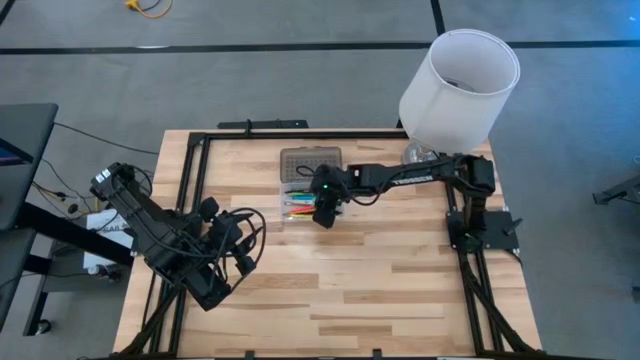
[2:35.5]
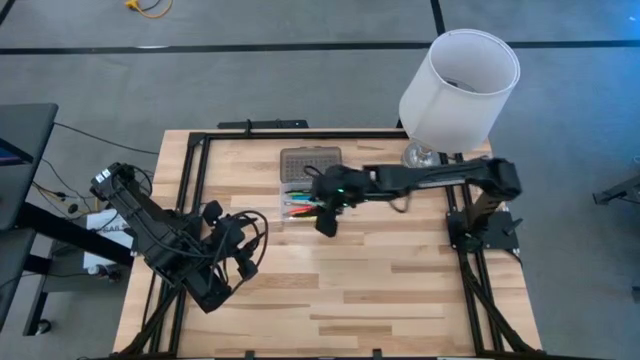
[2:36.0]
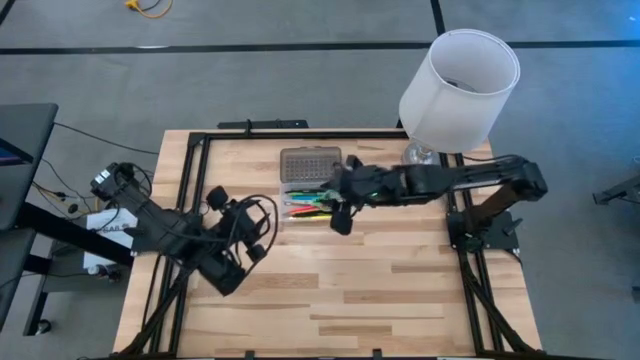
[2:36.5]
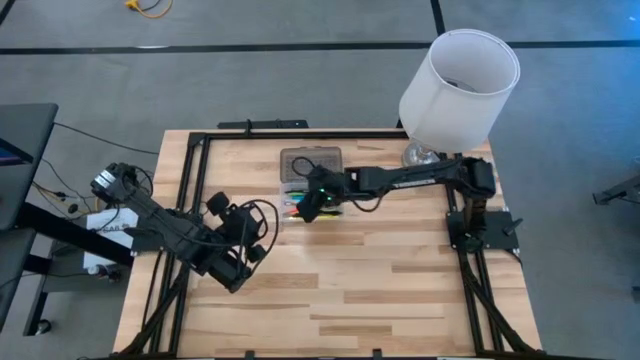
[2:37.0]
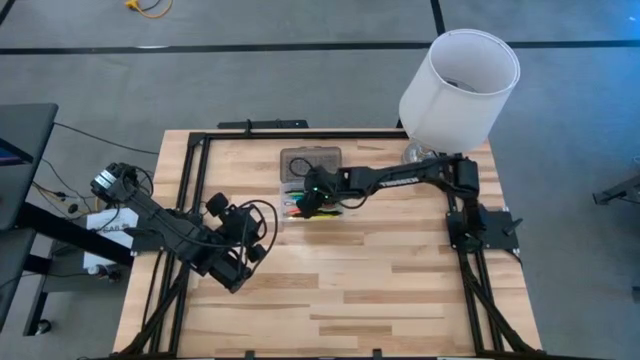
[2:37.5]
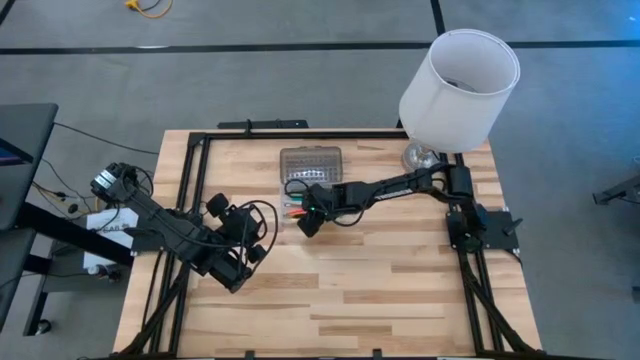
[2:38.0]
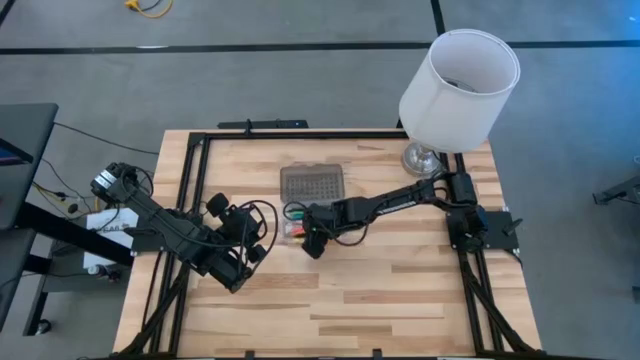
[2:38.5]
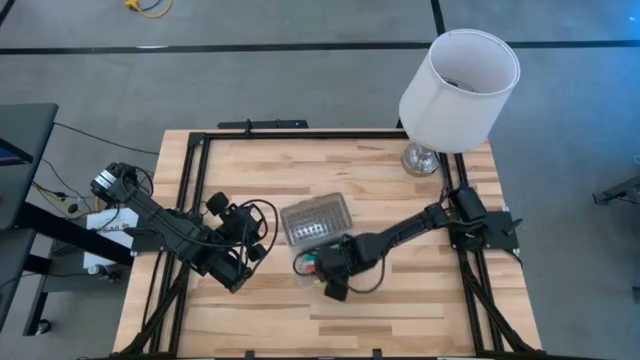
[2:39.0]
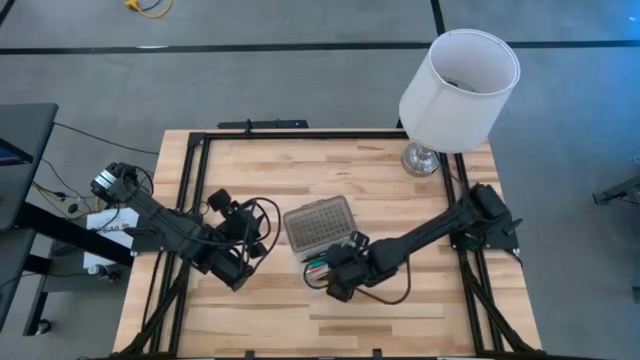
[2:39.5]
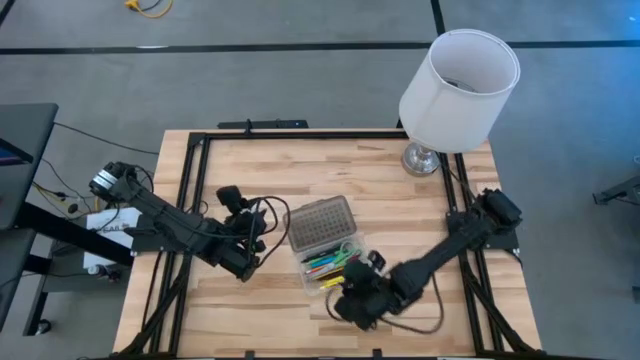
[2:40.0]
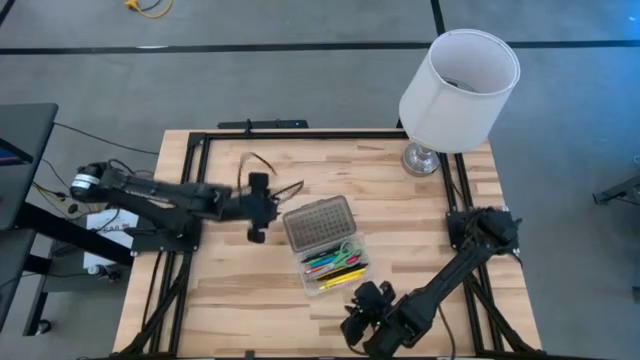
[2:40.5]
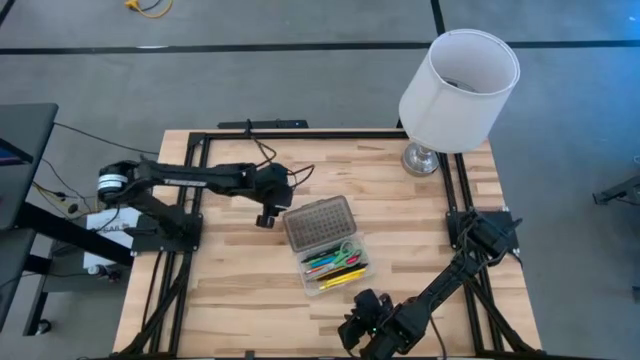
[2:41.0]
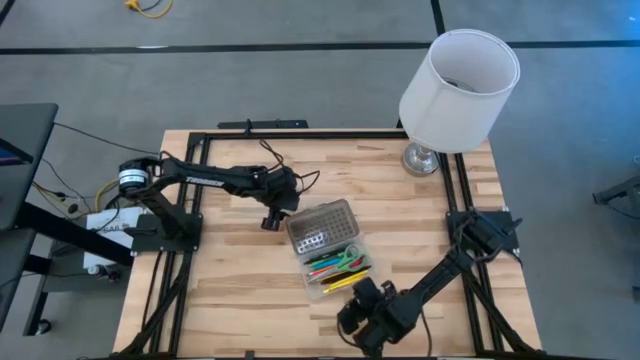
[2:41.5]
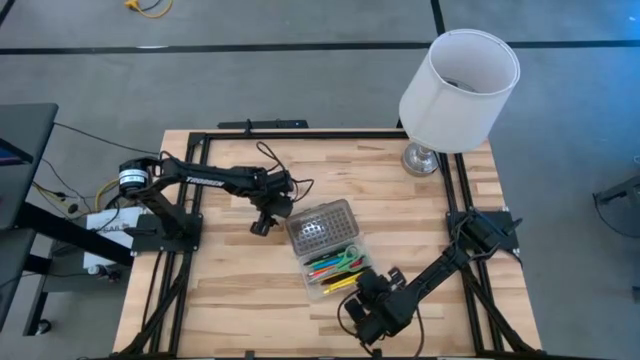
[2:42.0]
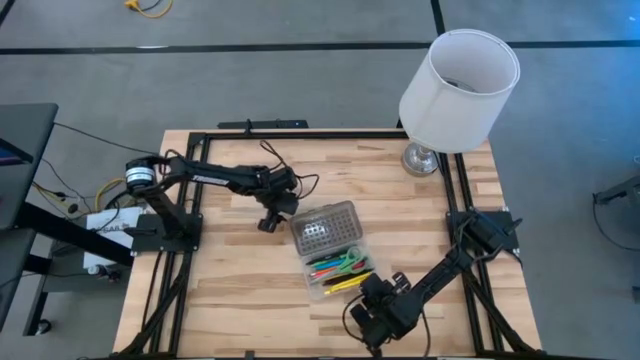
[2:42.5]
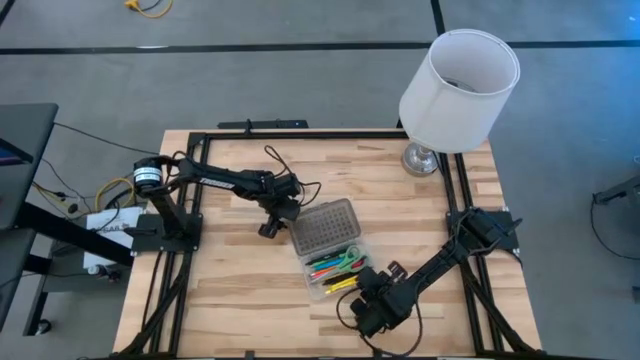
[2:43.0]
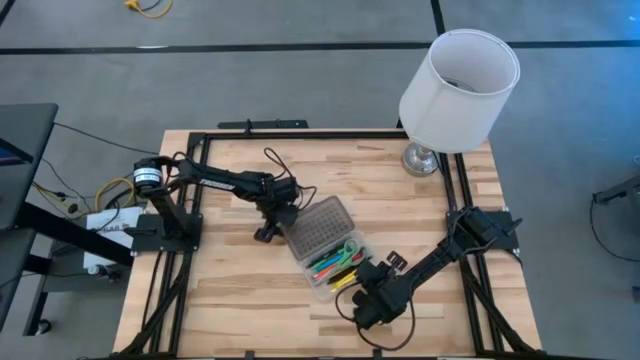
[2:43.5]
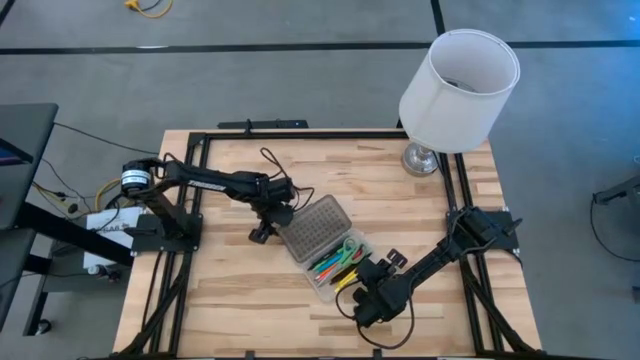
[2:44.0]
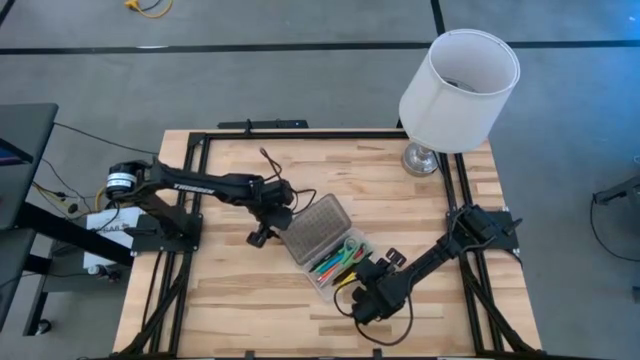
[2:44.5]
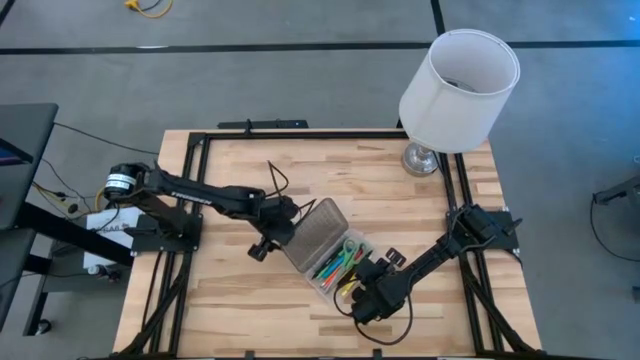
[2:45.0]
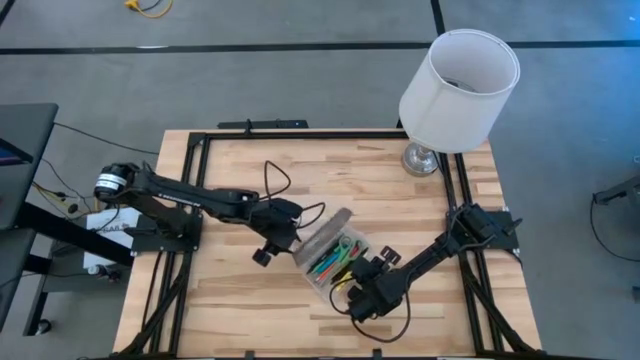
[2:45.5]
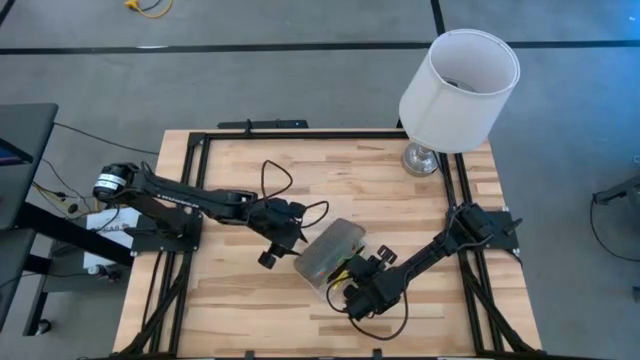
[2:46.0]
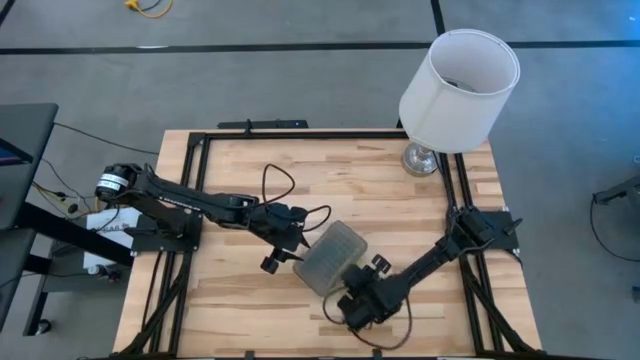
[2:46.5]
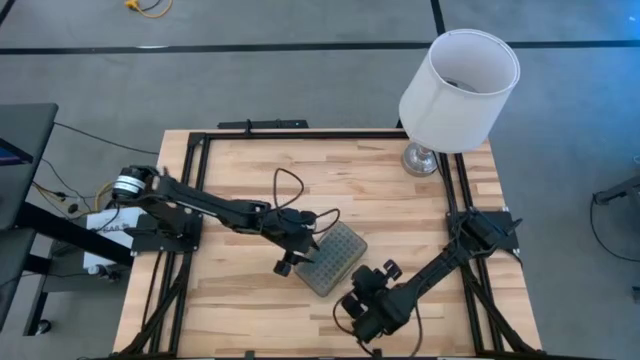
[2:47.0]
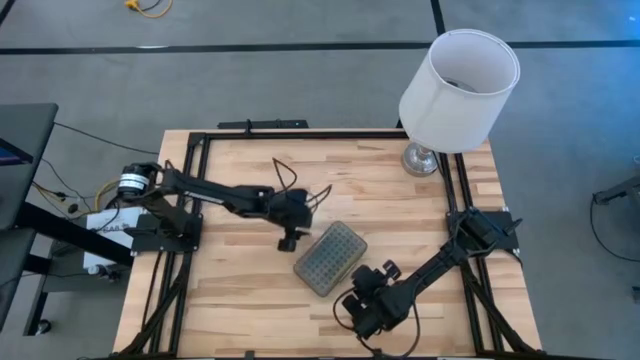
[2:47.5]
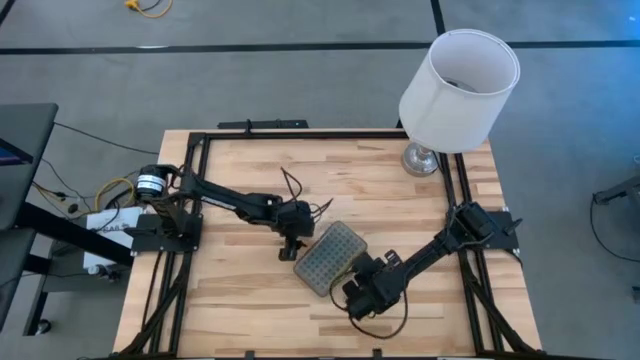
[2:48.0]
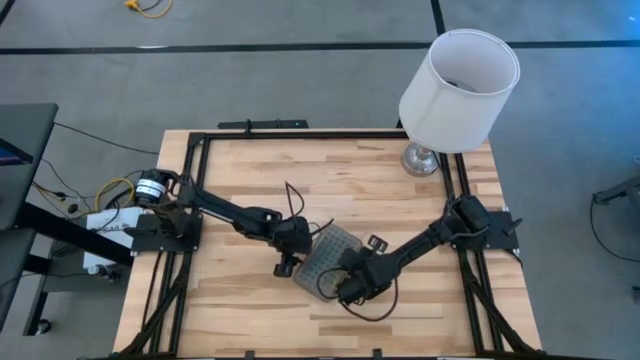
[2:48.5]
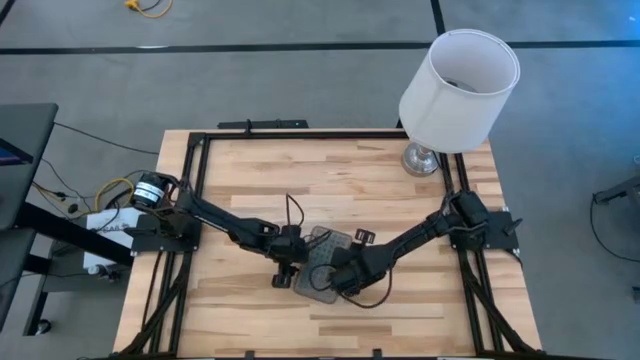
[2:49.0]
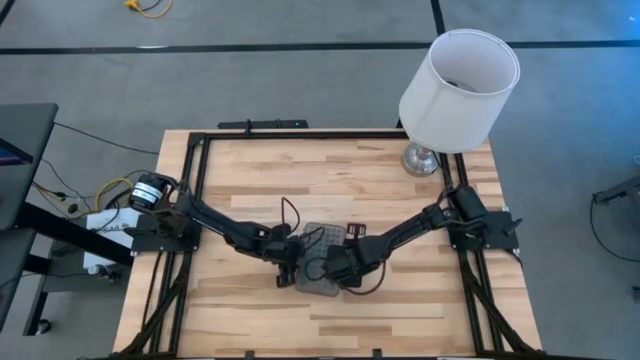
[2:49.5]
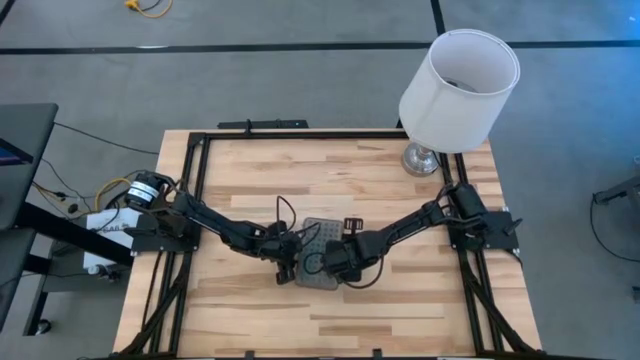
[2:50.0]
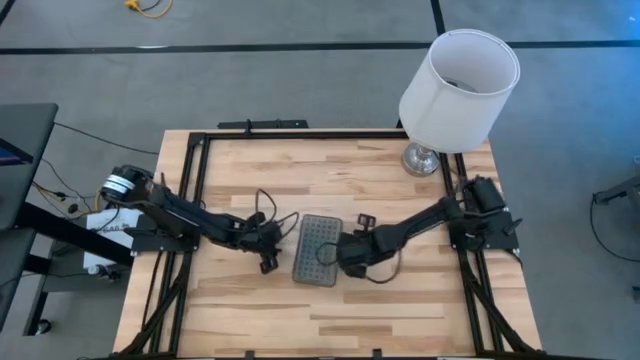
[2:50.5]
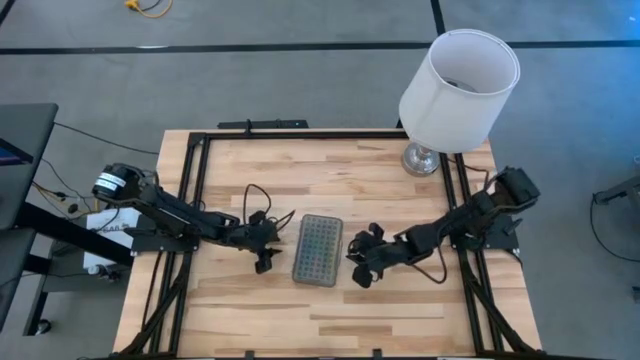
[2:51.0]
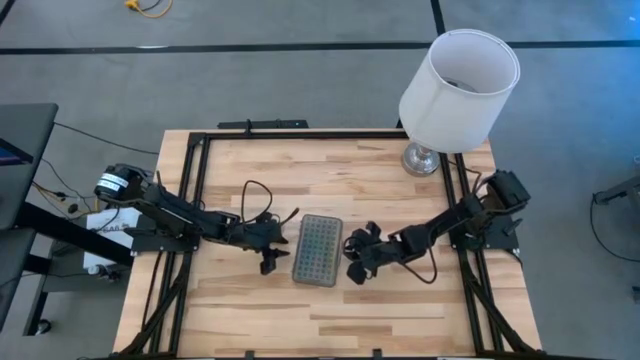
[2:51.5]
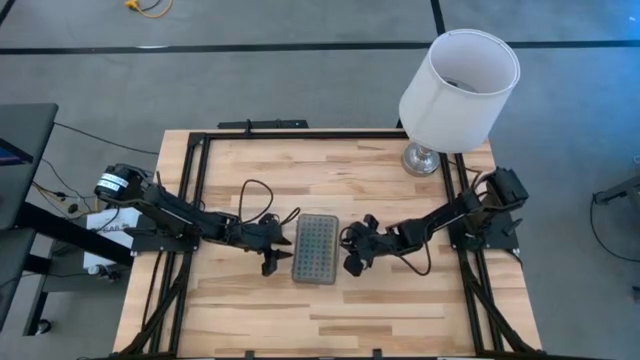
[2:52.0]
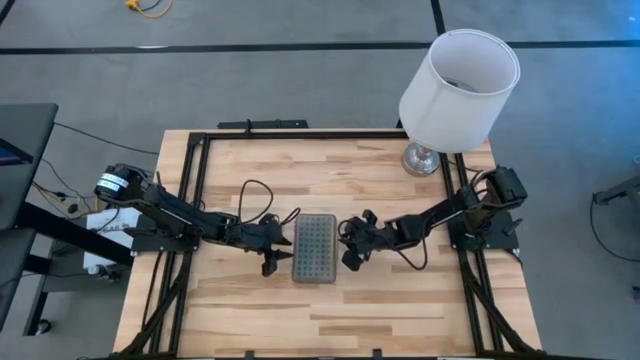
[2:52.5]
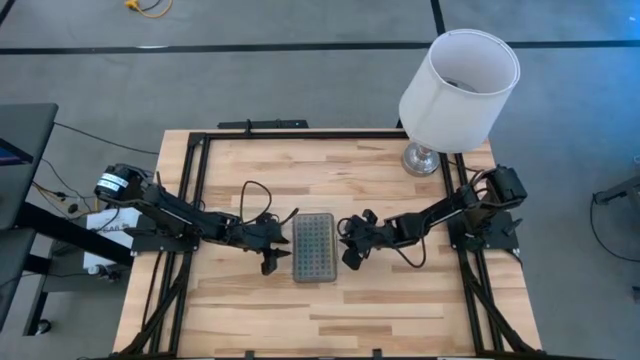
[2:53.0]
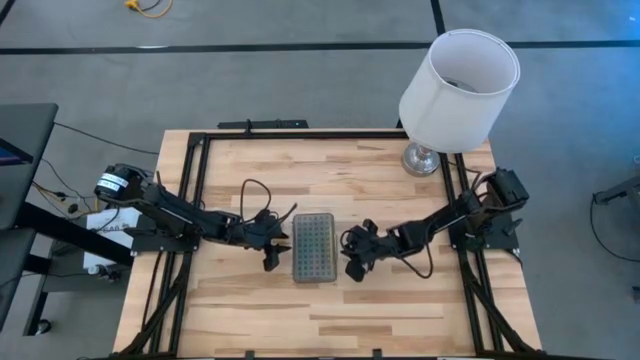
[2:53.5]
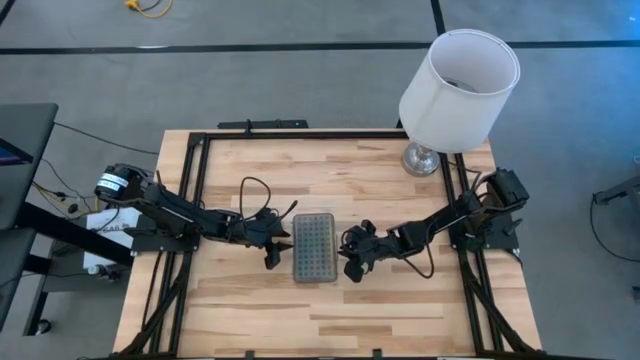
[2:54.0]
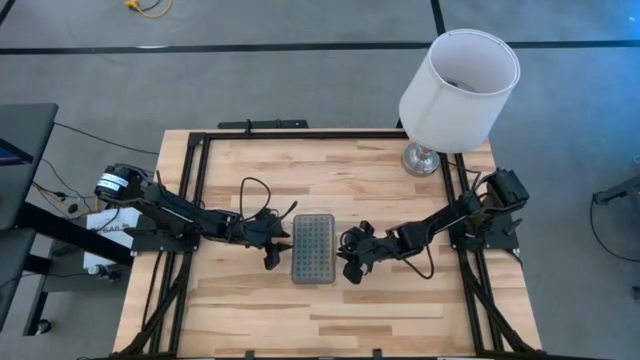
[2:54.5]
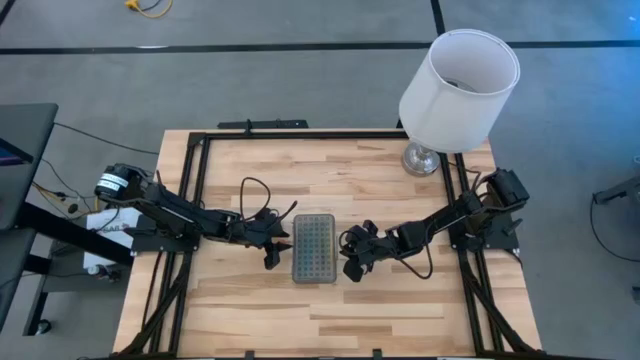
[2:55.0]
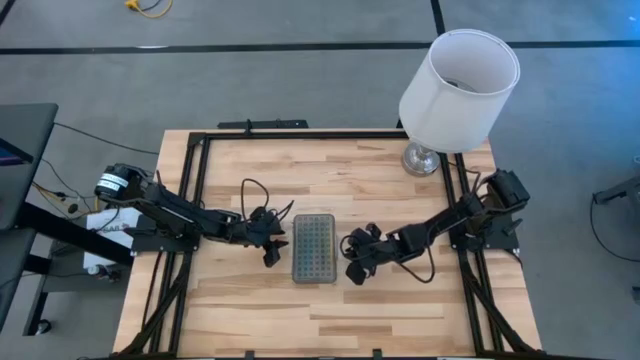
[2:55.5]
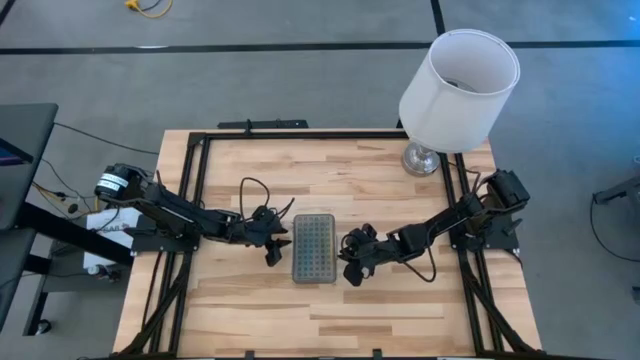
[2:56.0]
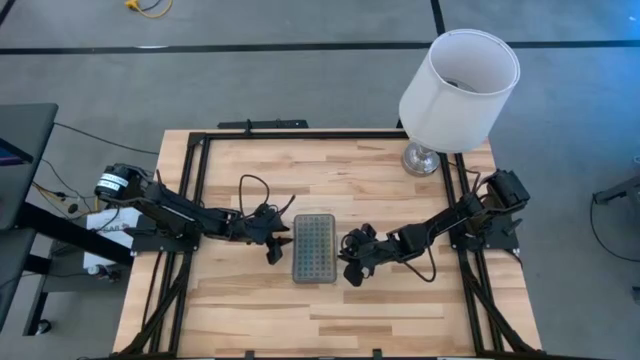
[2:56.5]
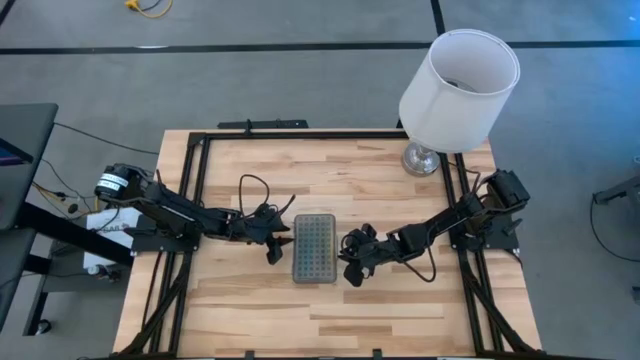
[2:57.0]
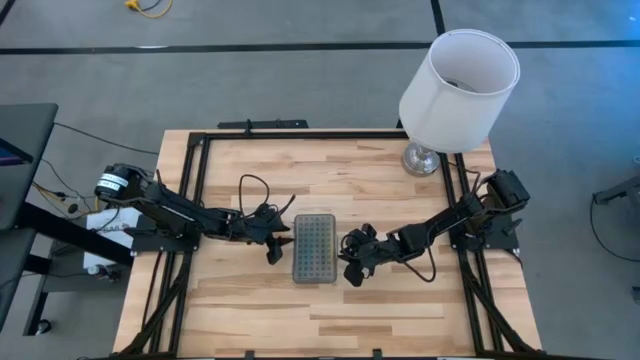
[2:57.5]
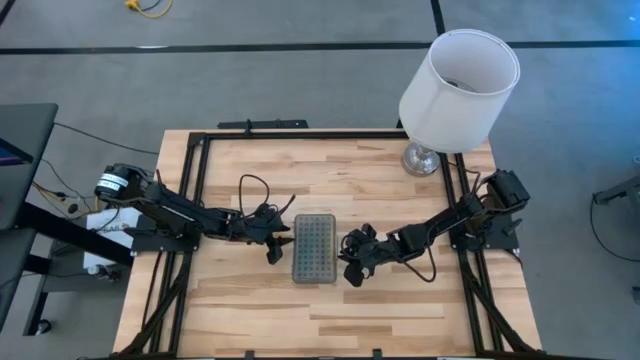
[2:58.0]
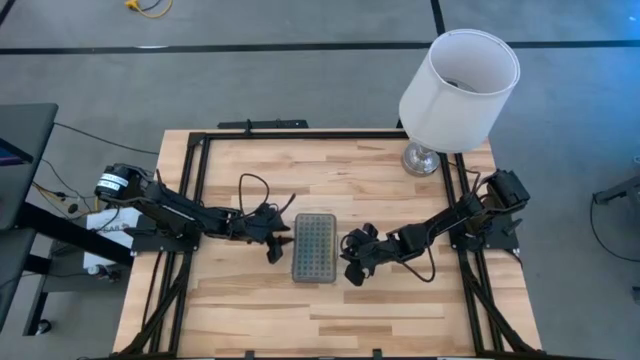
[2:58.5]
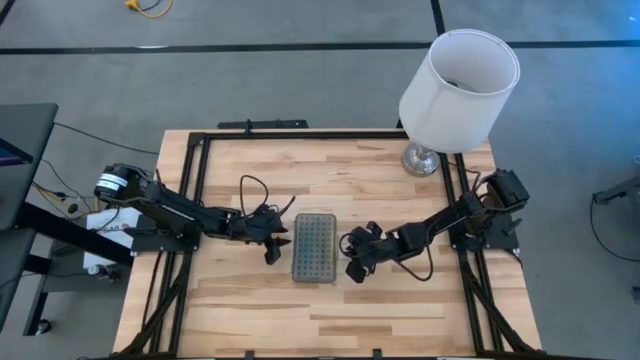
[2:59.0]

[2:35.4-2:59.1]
Task: Pick & place school supplies into a supply box
Close the supply box
